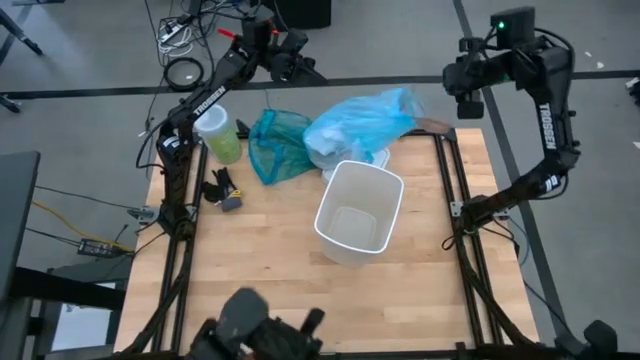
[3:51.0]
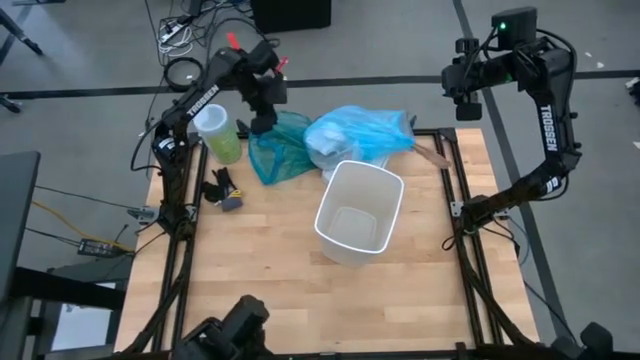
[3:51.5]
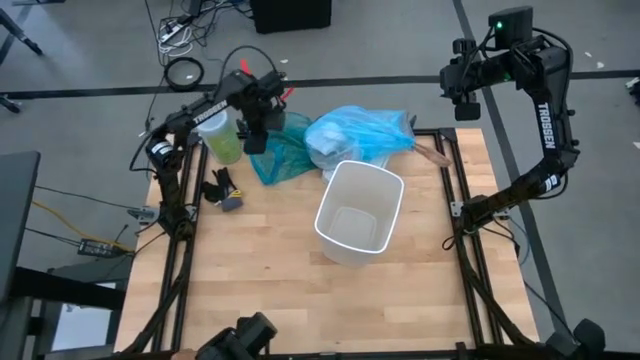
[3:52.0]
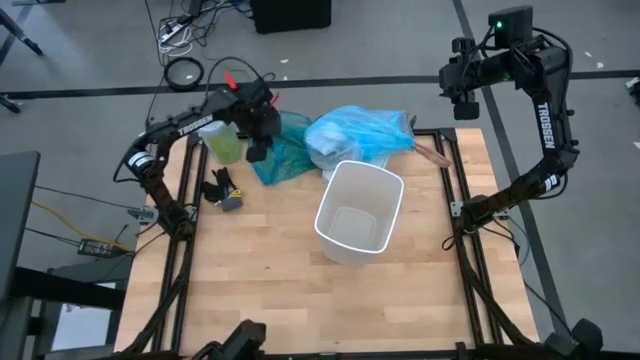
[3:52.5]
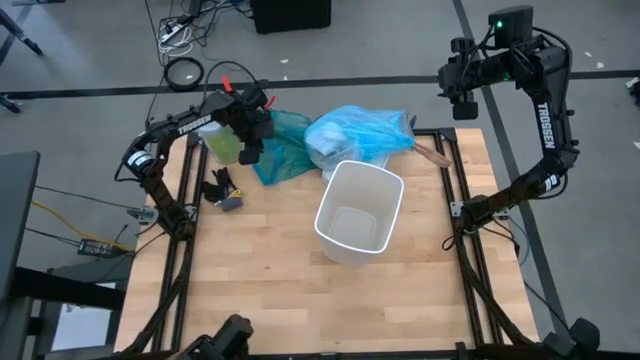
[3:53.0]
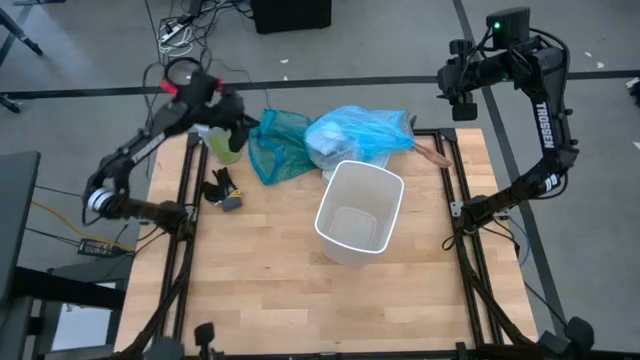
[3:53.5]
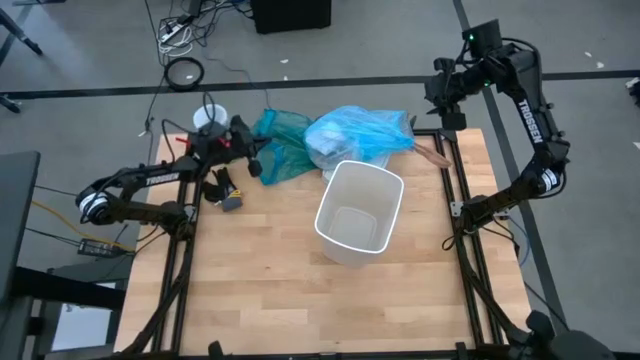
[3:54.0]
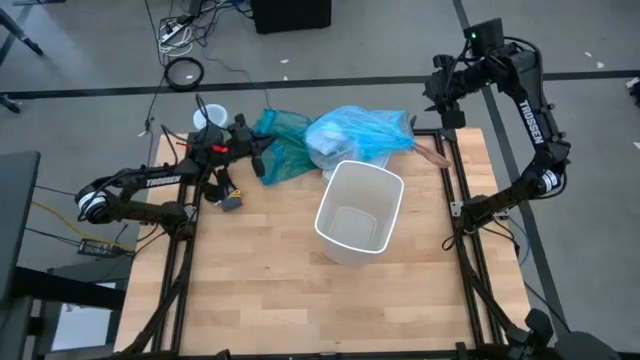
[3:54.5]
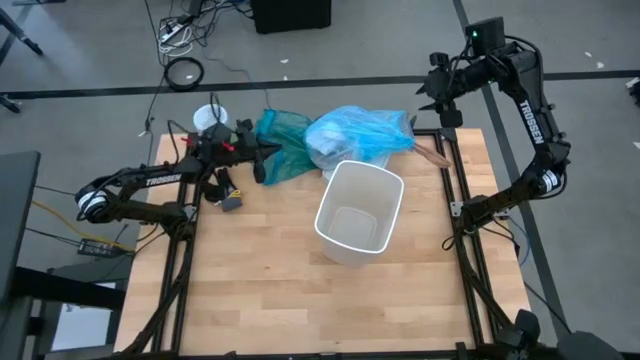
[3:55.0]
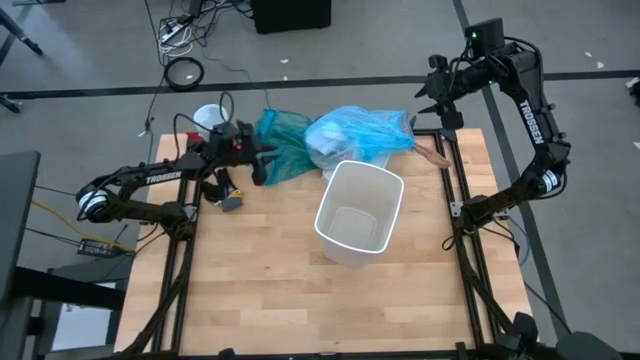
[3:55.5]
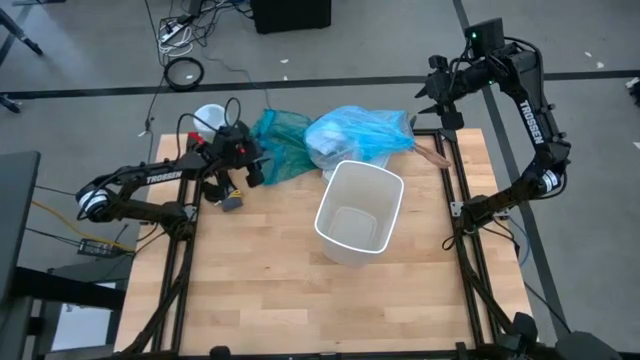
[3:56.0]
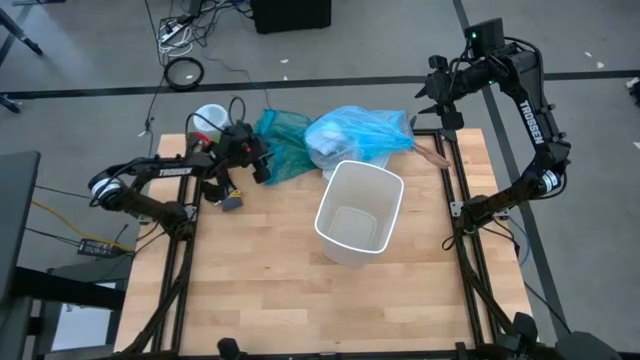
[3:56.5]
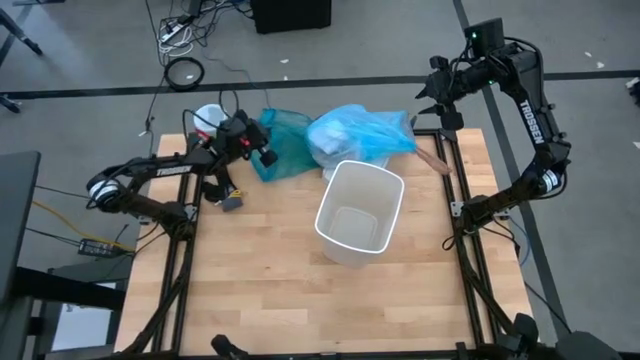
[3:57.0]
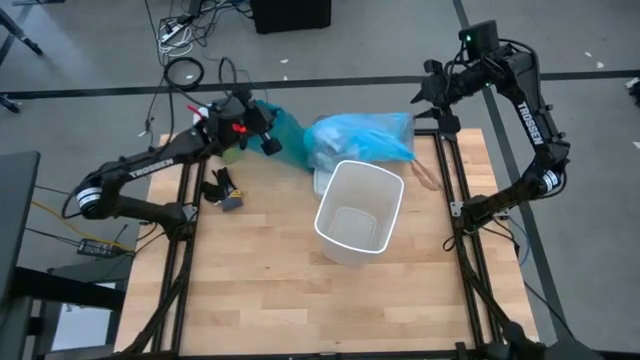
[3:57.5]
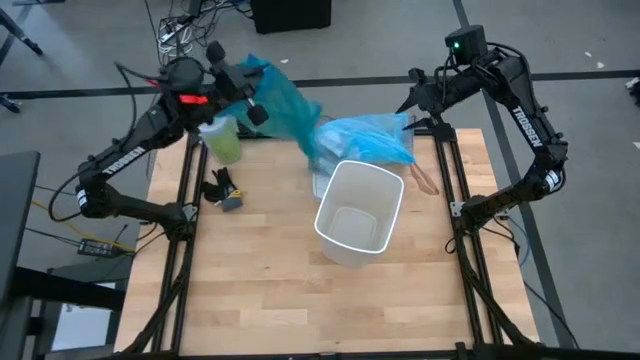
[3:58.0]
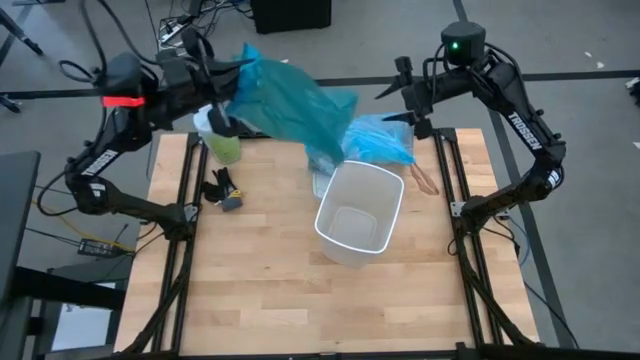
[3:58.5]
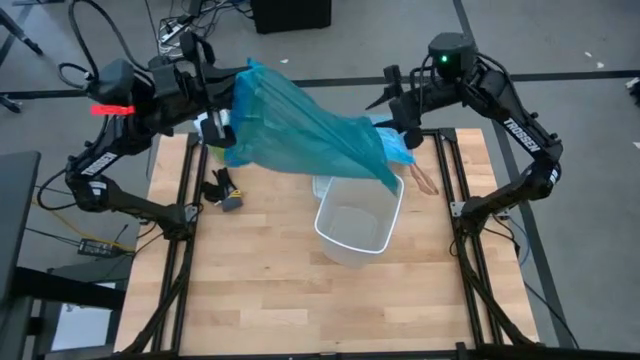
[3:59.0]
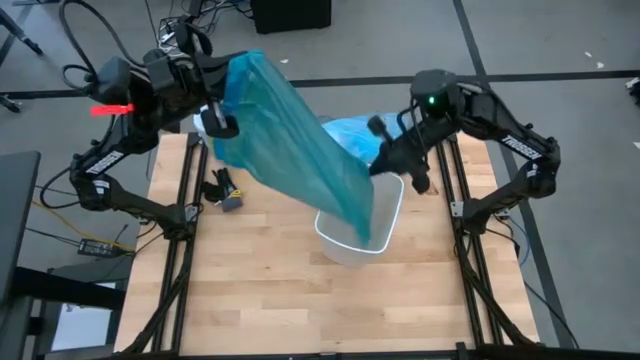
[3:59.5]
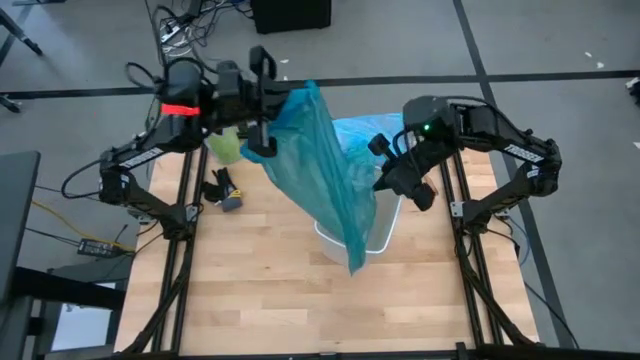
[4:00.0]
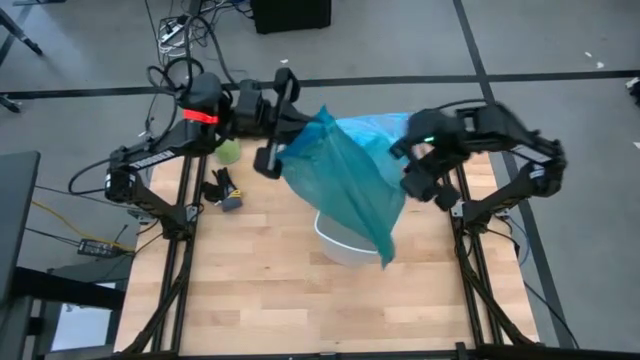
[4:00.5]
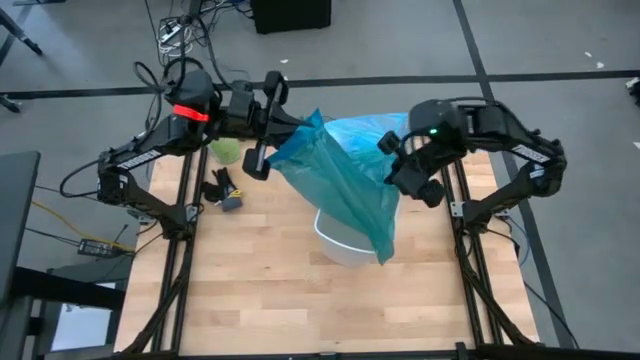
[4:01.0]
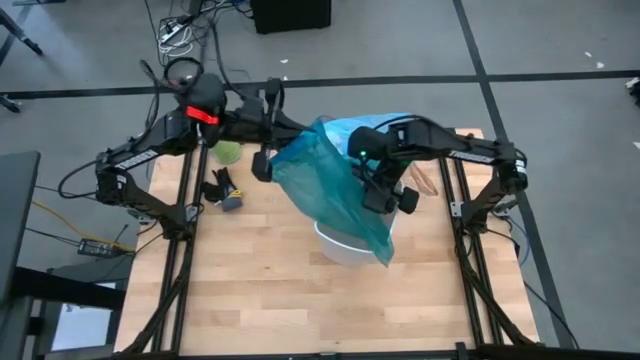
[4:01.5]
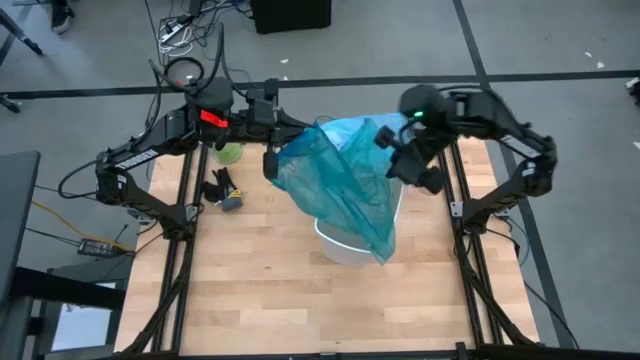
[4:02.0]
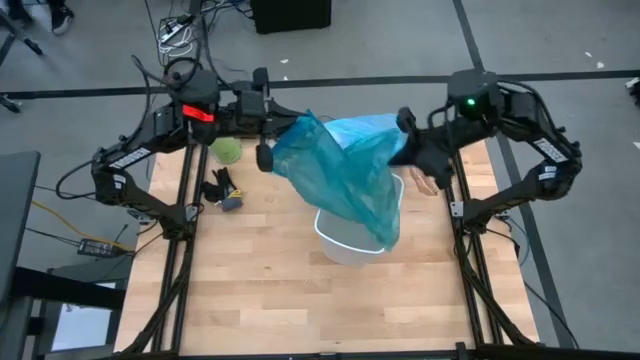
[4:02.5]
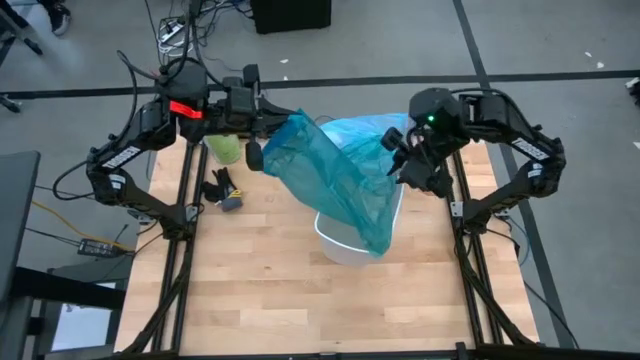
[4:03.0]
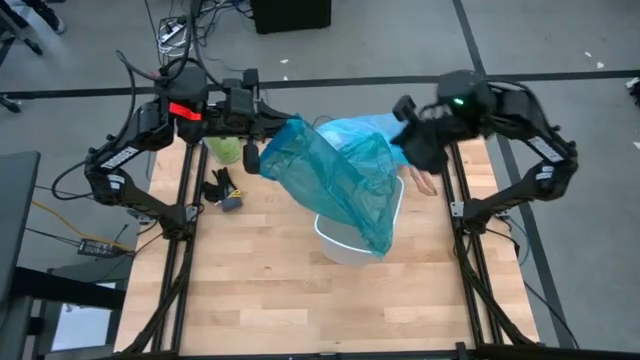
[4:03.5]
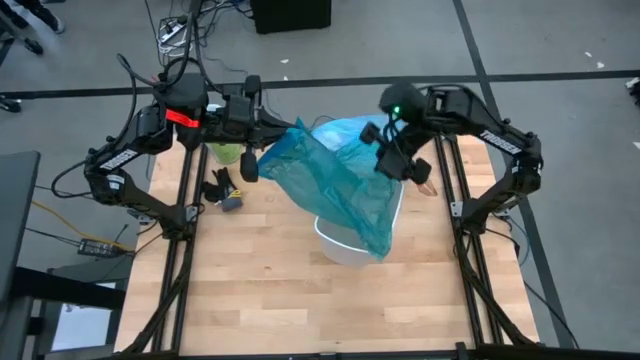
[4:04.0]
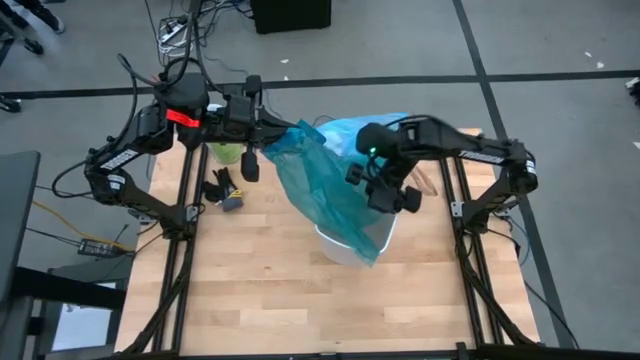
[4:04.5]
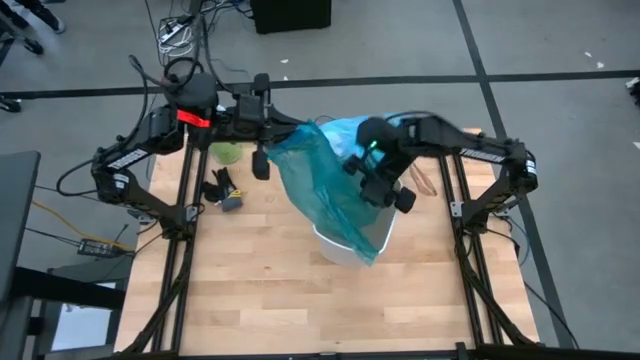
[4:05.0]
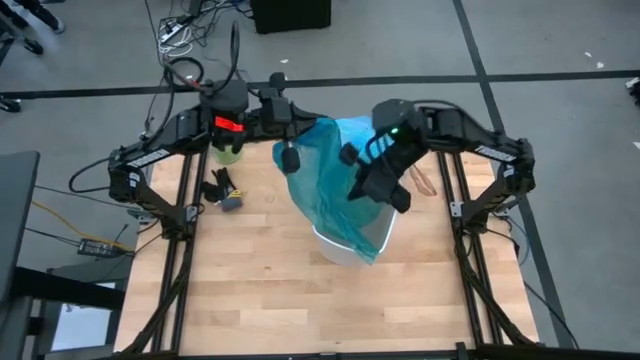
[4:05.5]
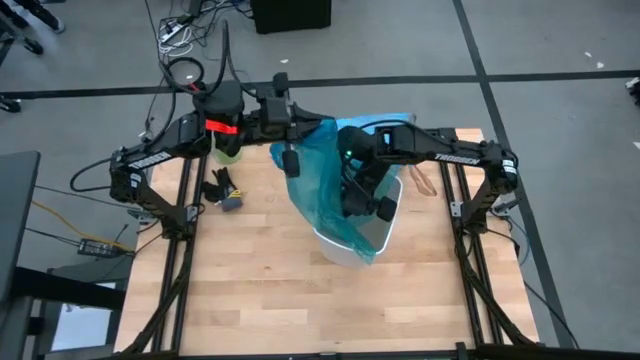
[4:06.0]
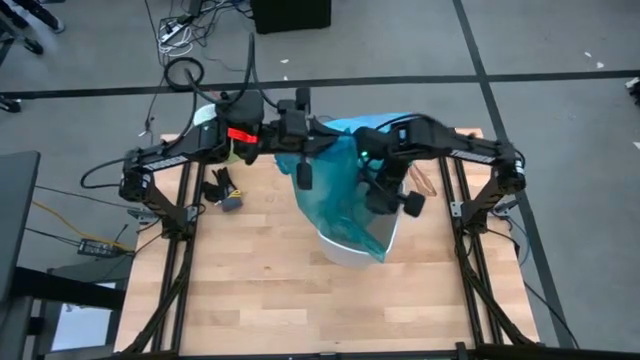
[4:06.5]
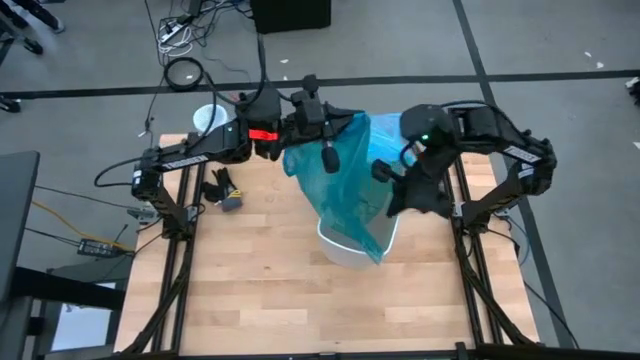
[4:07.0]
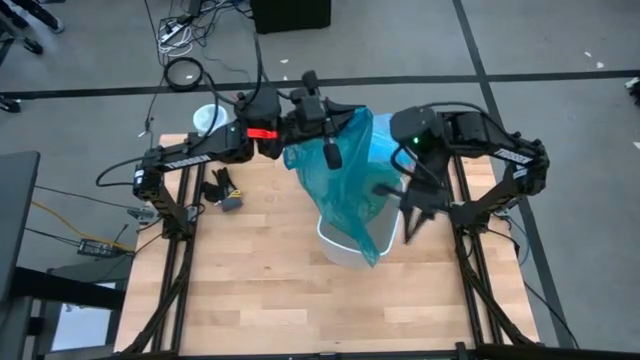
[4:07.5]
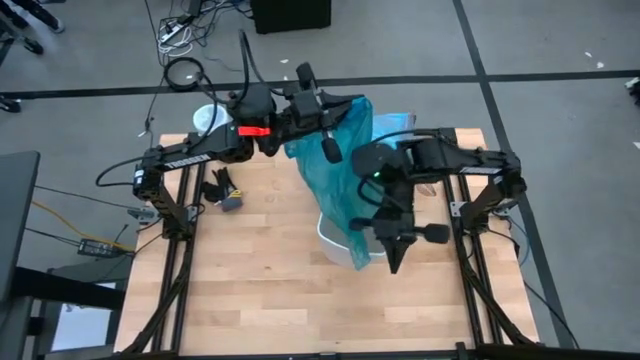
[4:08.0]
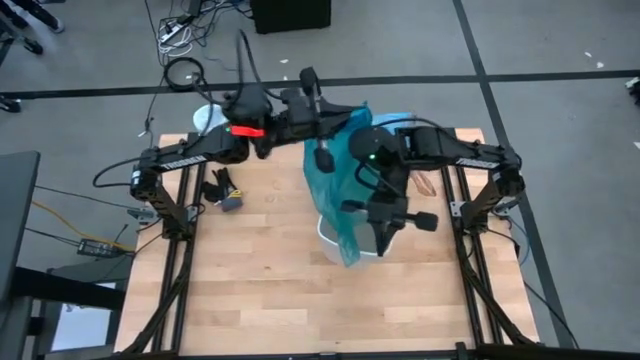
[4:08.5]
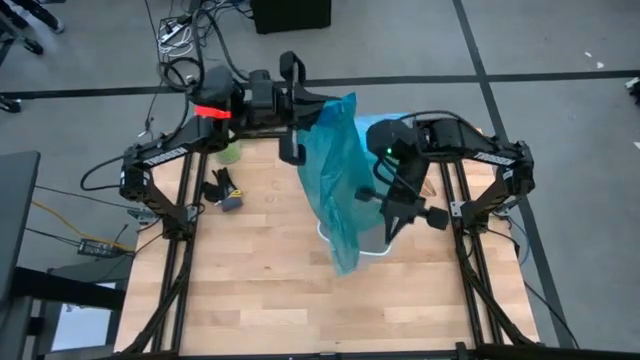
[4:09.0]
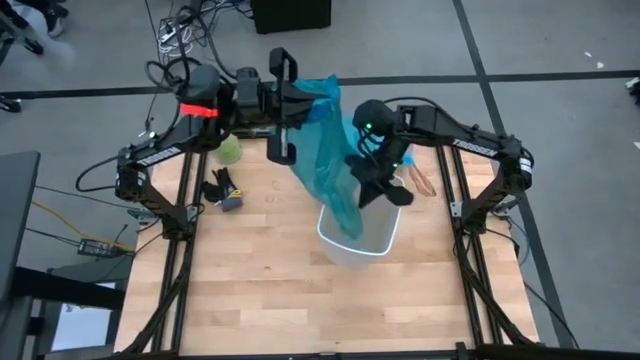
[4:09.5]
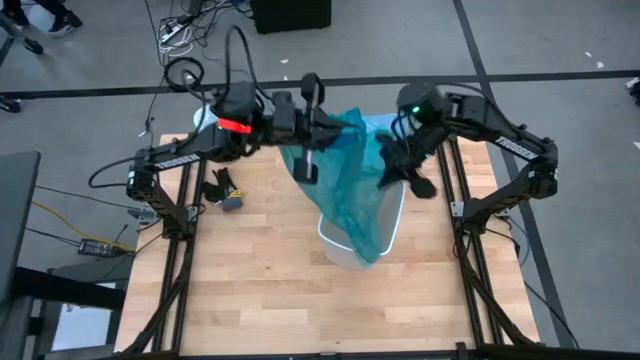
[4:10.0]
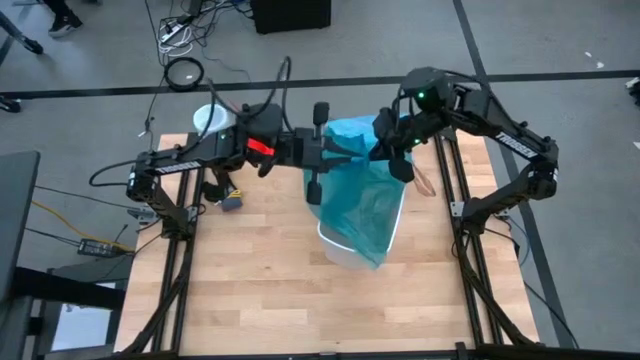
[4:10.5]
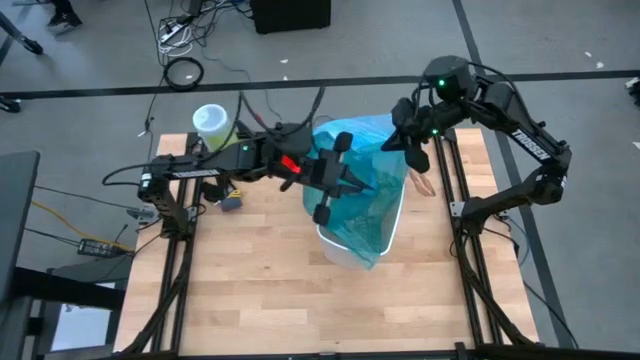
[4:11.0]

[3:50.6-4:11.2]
Task: place trash/remove bag and relplace
Insert the blue trash bag into the white trash bin

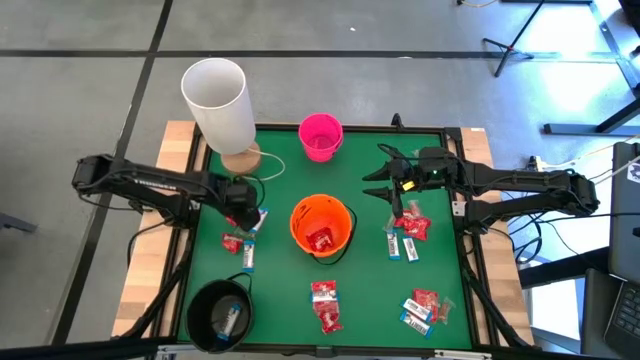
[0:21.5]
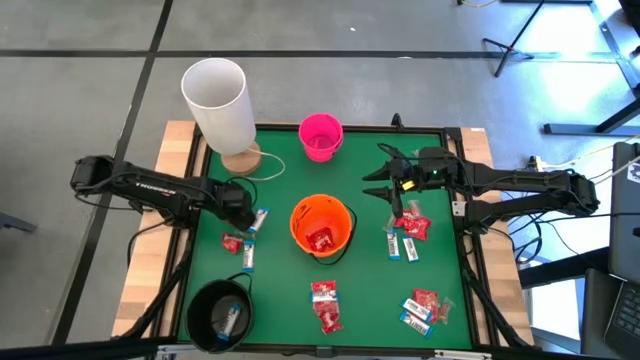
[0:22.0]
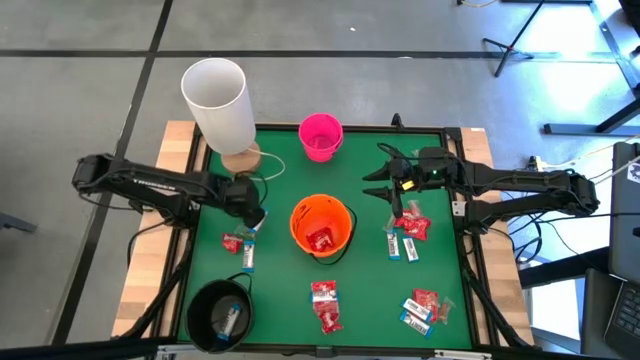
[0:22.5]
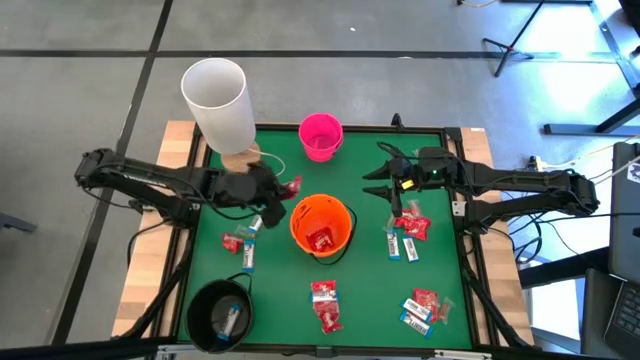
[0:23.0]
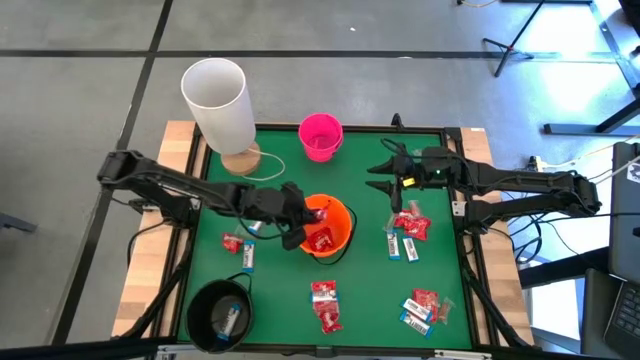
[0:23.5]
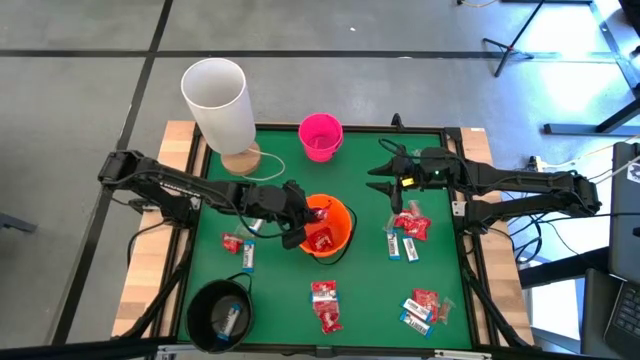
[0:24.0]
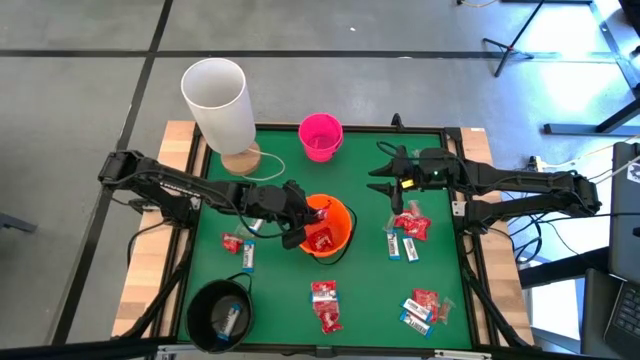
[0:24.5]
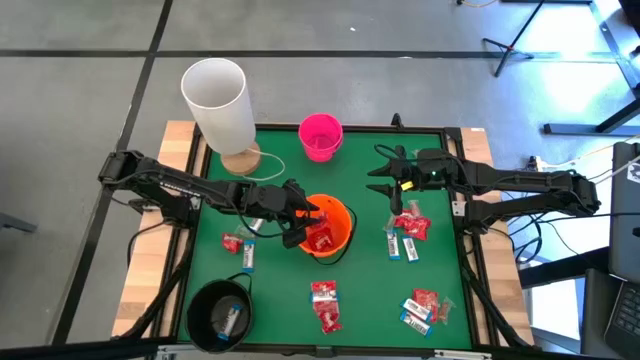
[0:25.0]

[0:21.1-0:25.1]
Task: Sort candy
Put the red candy into the orange bucket
